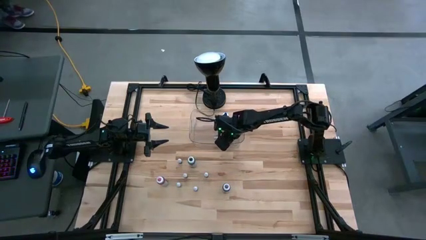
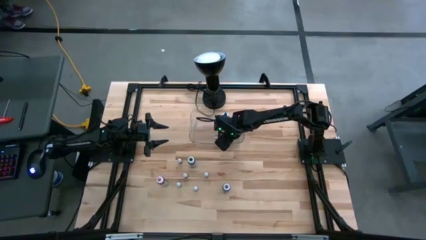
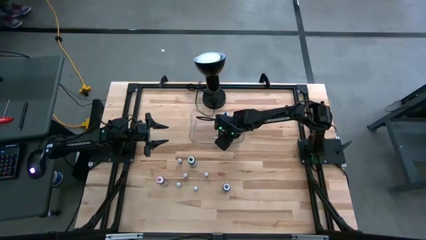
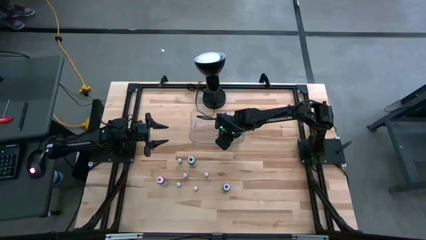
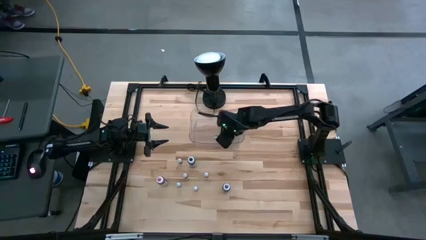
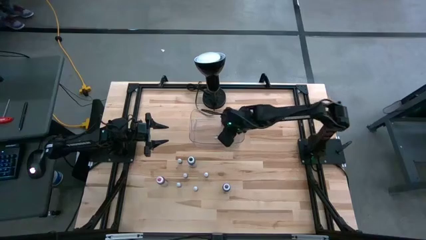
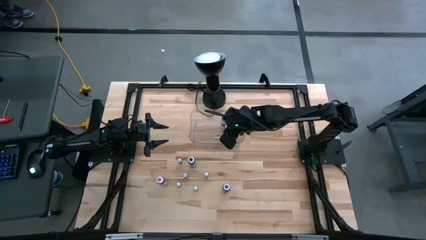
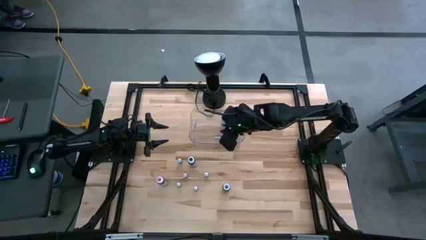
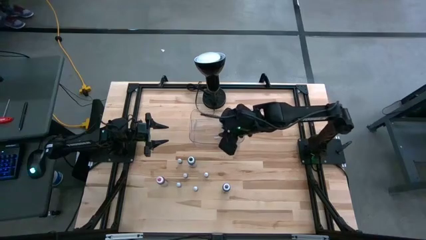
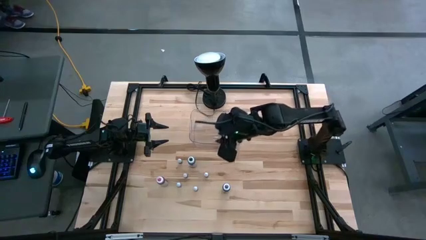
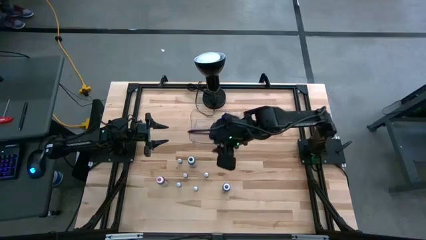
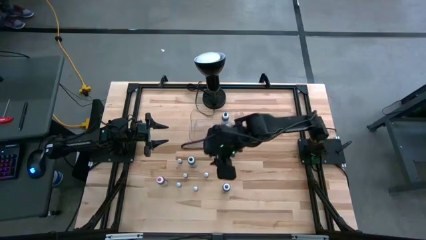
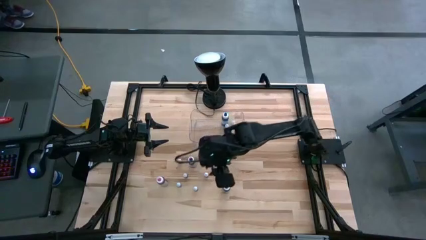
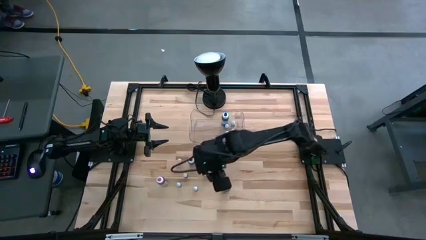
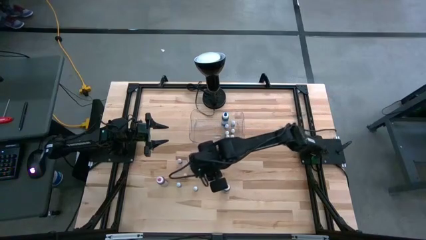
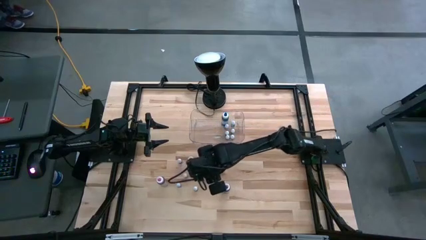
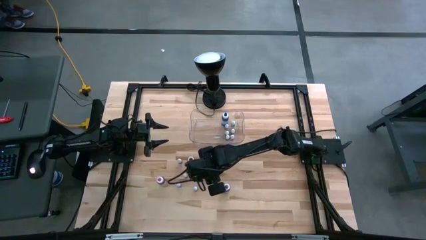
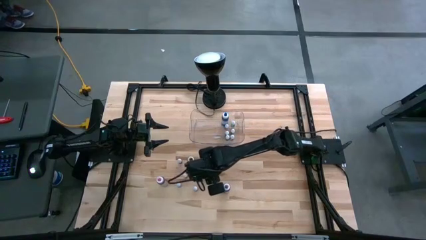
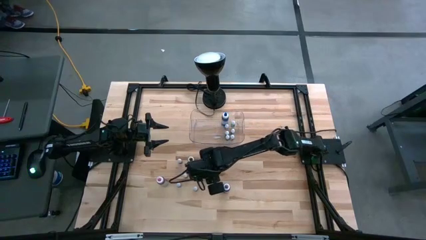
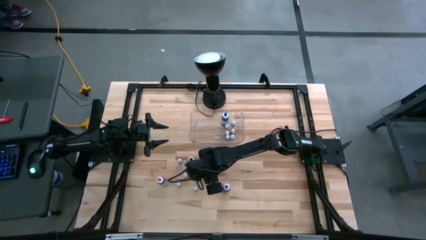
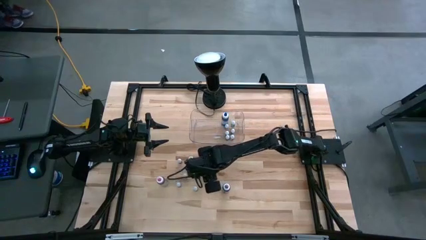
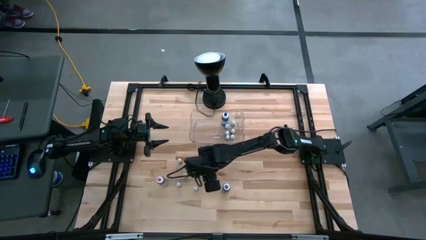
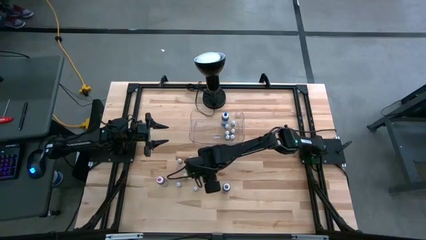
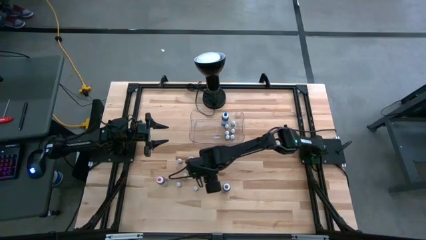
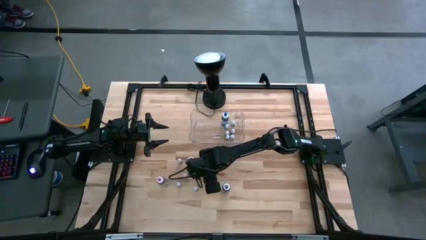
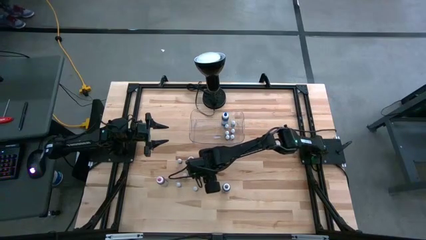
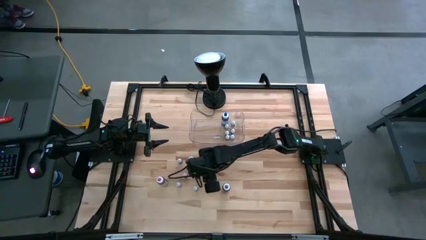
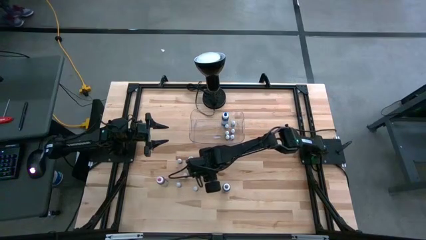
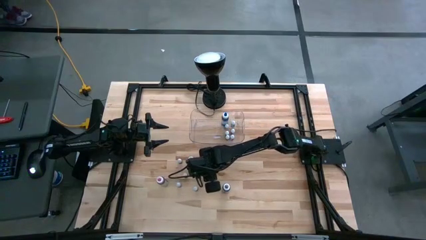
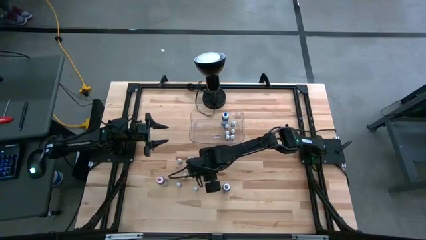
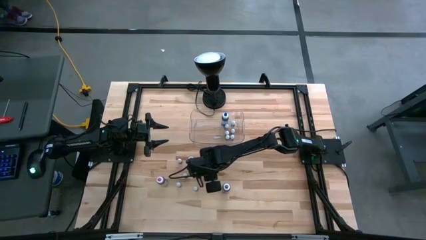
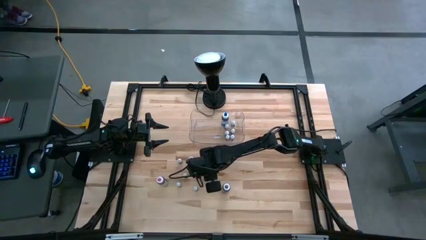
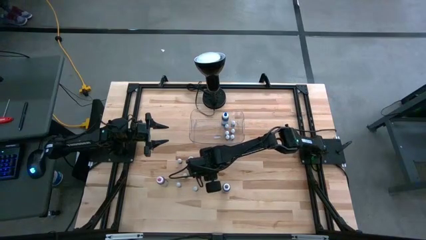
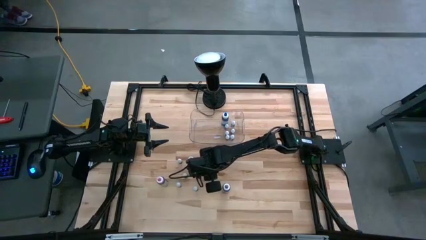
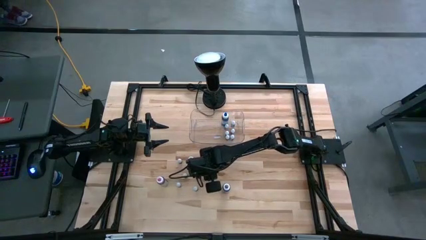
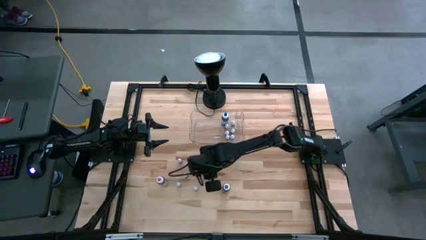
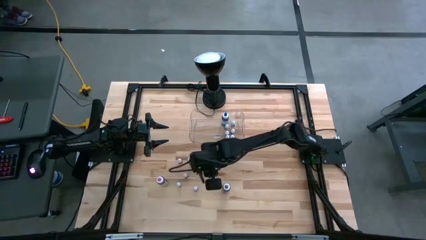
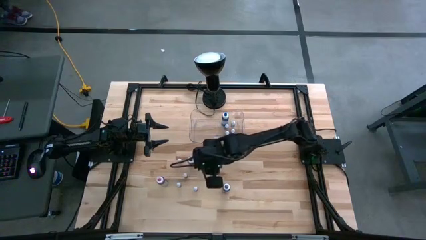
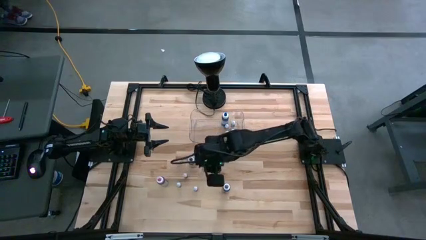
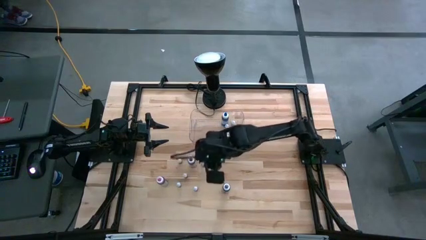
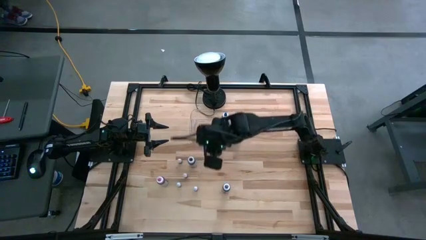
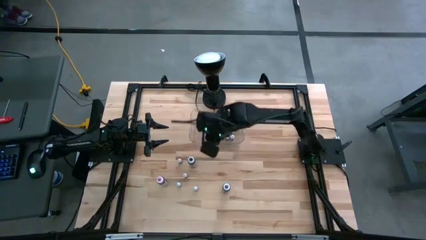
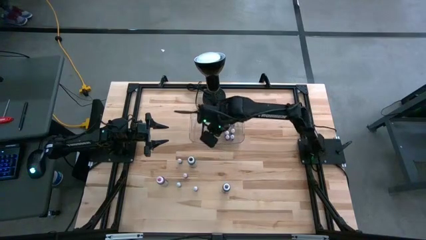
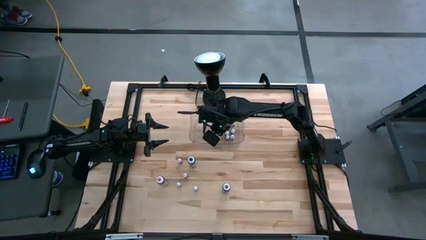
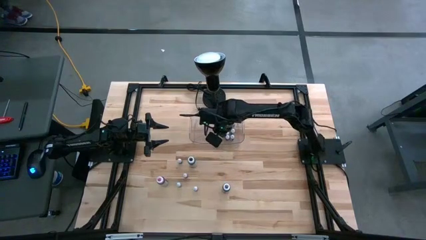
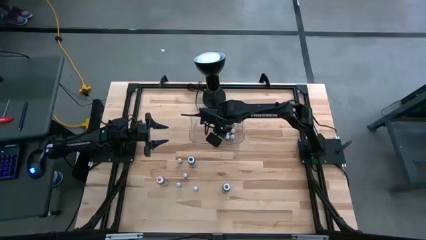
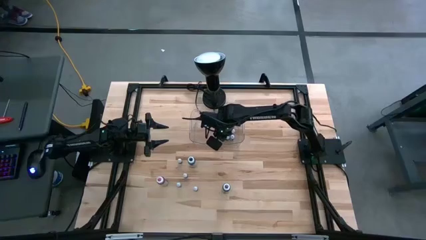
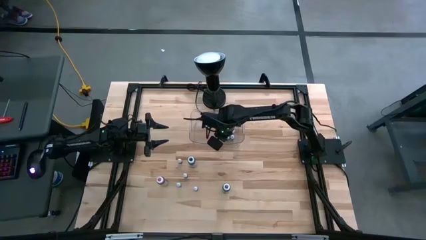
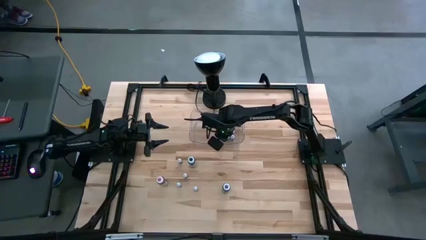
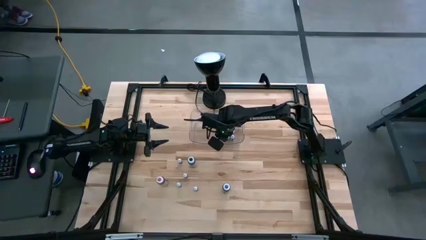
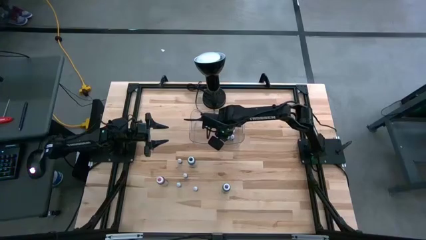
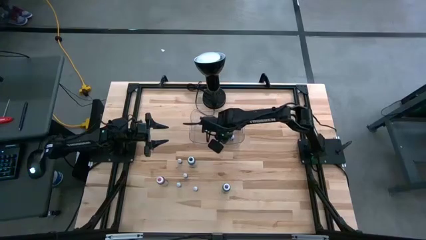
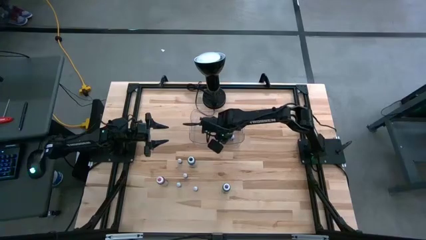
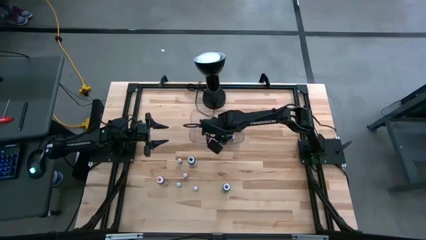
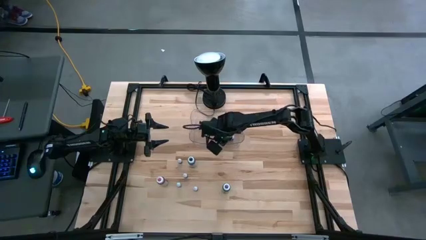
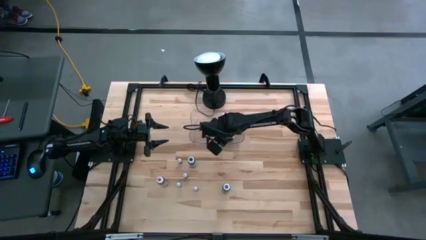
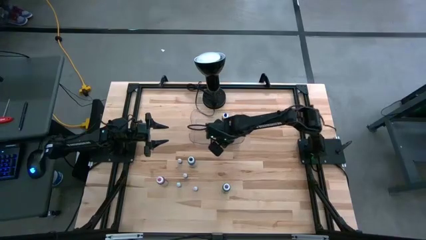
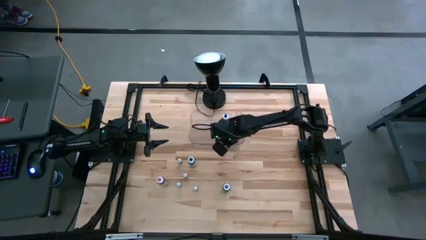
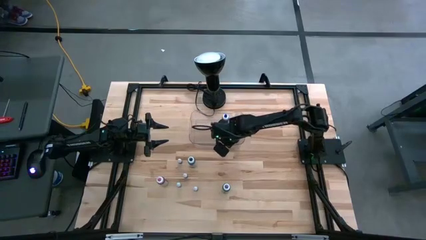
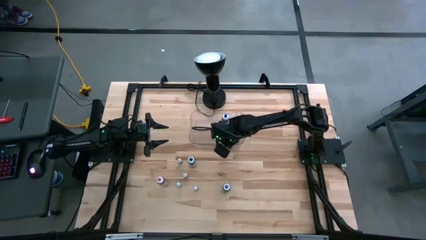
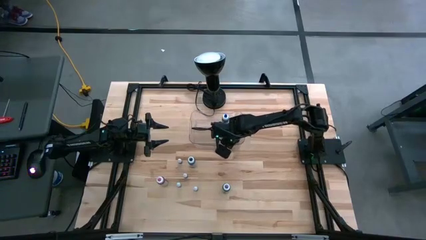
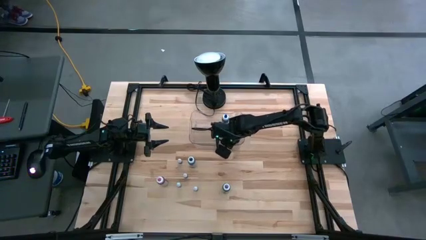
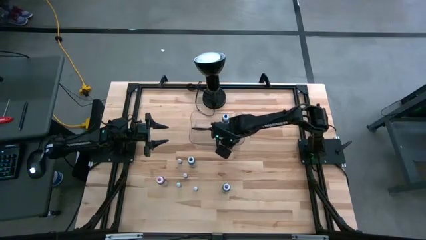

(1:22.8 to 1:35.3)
Task: Pick & Place food coloring
Put the right orange food coloring bottle into the transparent bin
